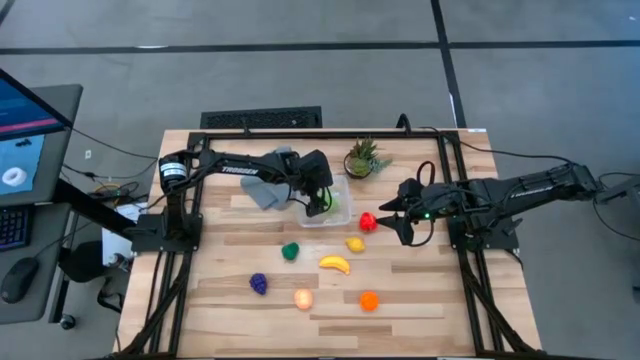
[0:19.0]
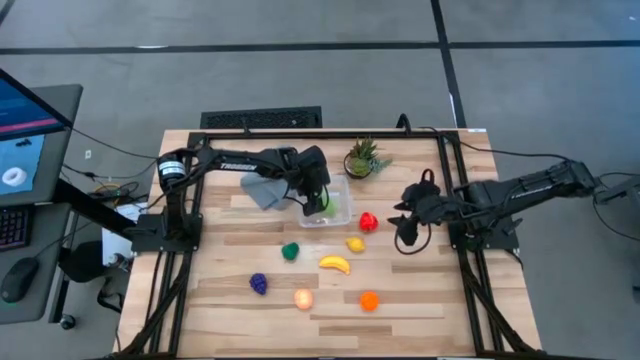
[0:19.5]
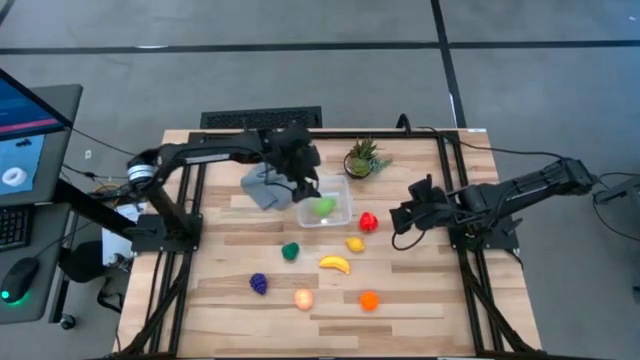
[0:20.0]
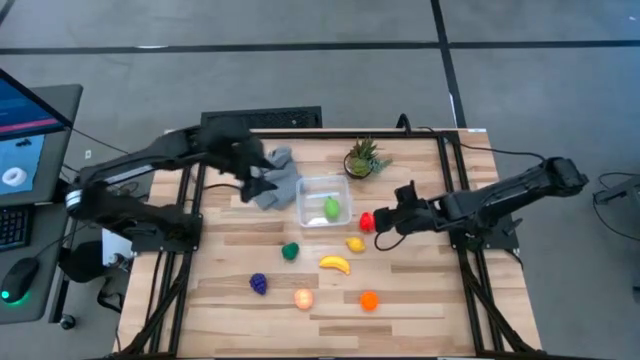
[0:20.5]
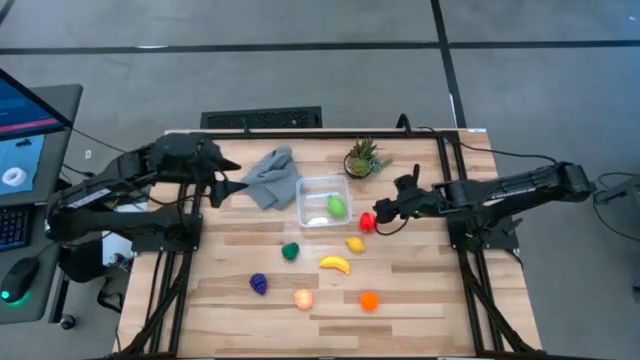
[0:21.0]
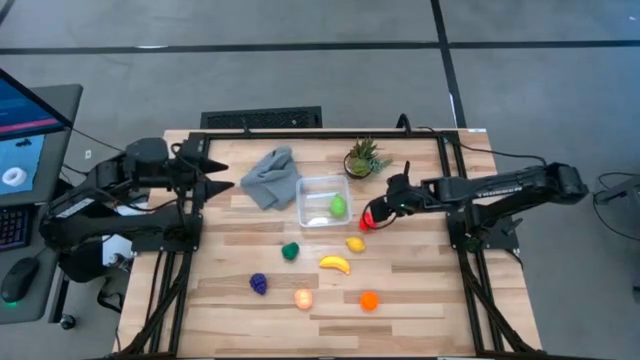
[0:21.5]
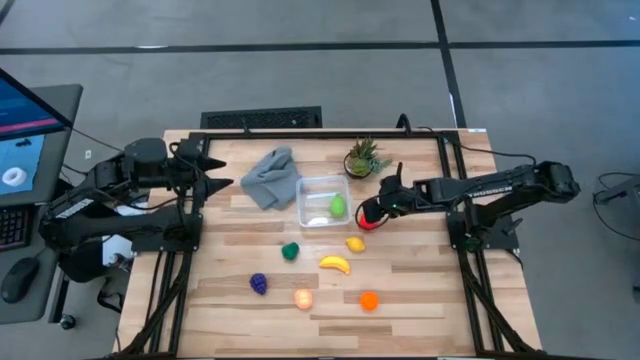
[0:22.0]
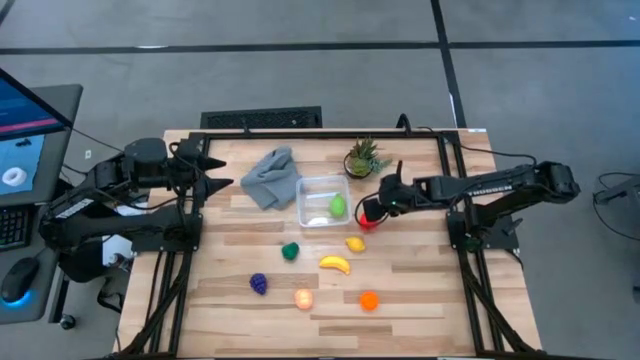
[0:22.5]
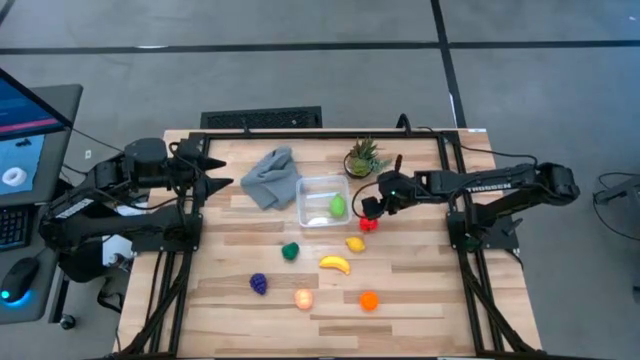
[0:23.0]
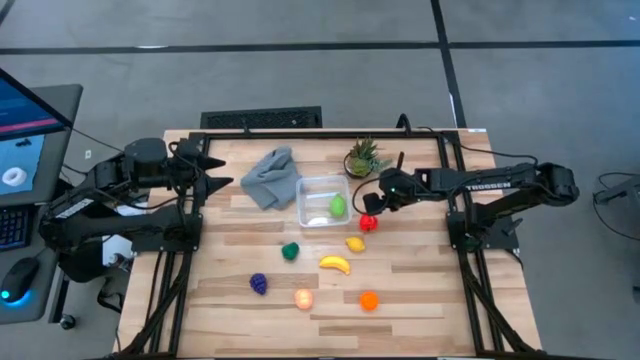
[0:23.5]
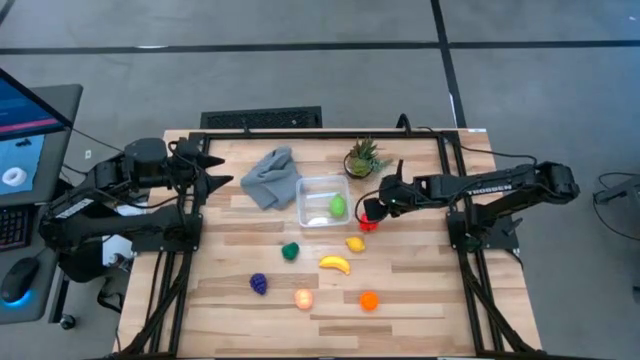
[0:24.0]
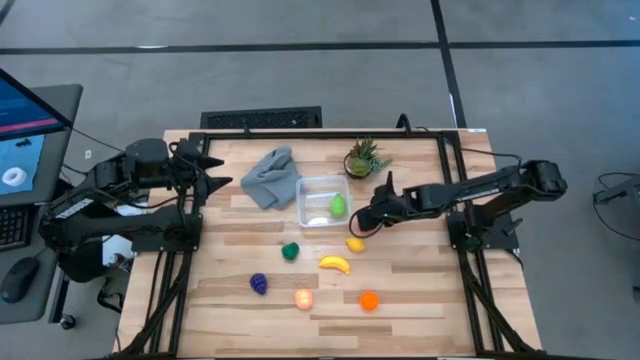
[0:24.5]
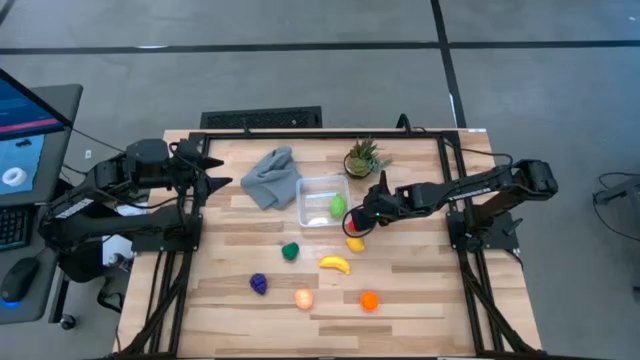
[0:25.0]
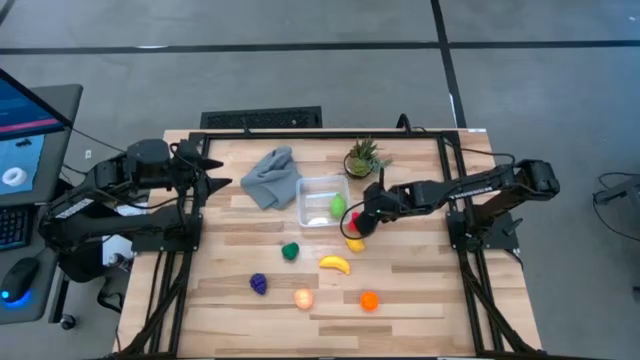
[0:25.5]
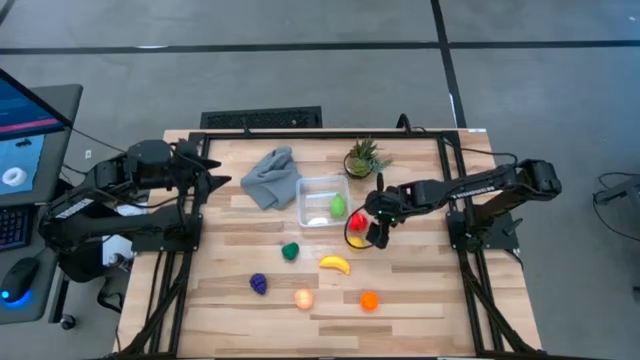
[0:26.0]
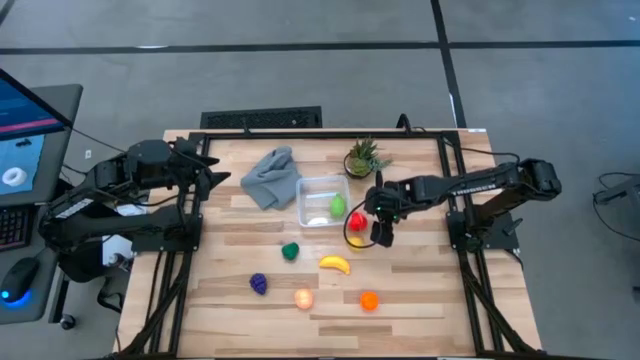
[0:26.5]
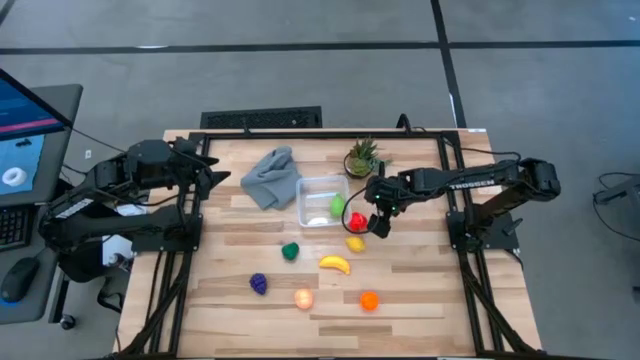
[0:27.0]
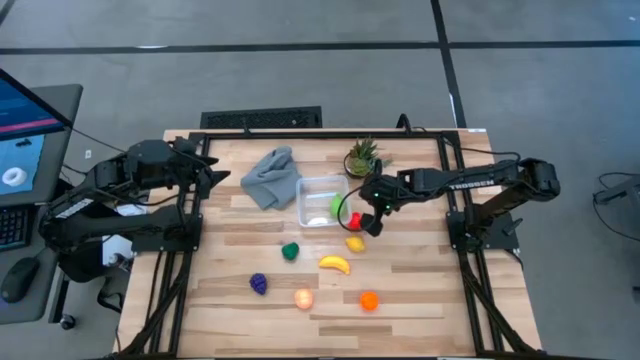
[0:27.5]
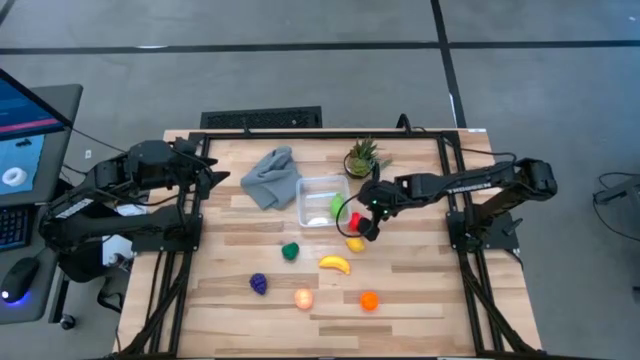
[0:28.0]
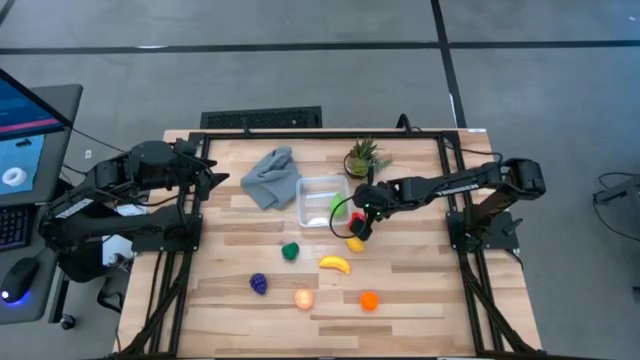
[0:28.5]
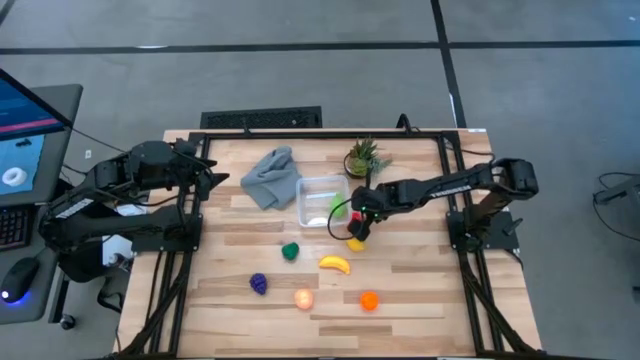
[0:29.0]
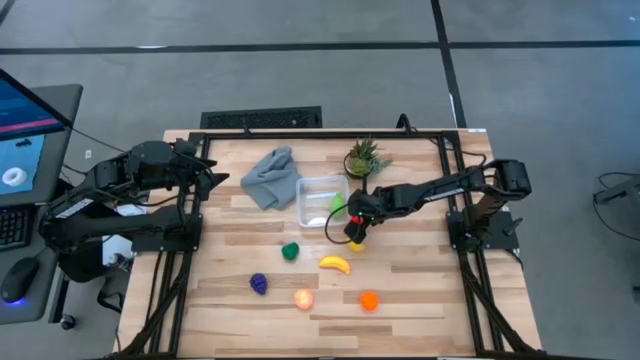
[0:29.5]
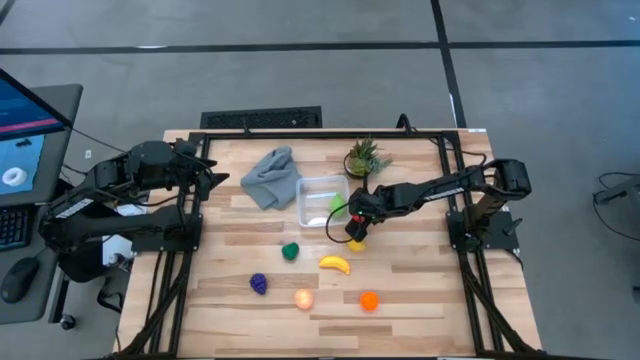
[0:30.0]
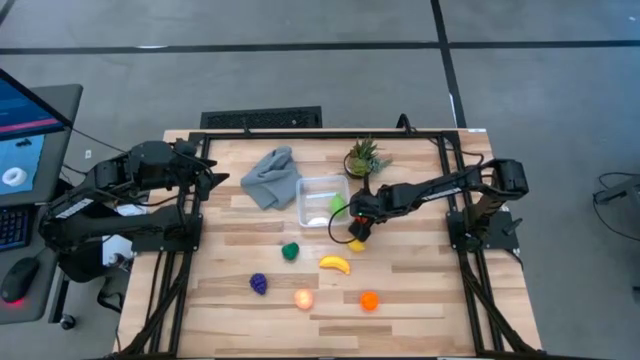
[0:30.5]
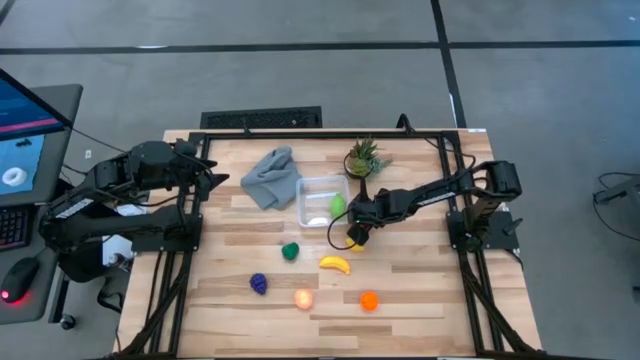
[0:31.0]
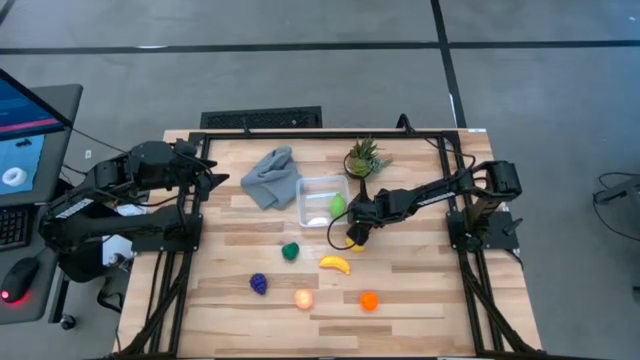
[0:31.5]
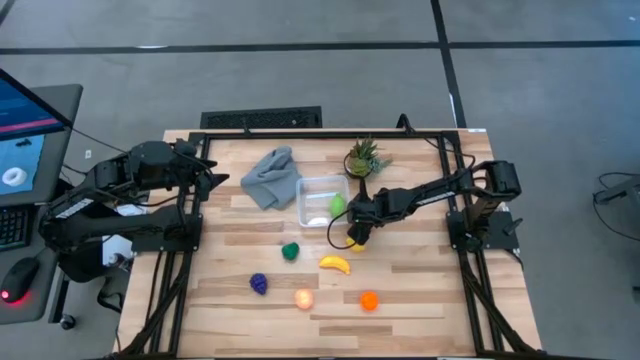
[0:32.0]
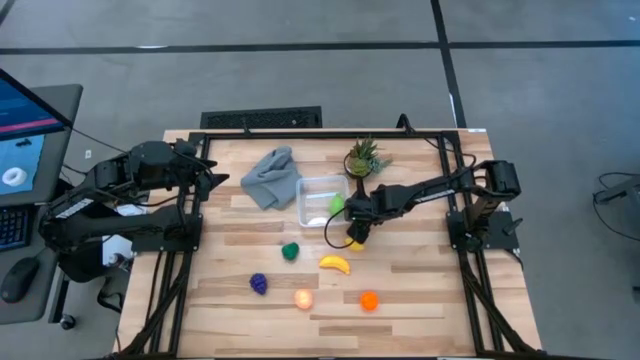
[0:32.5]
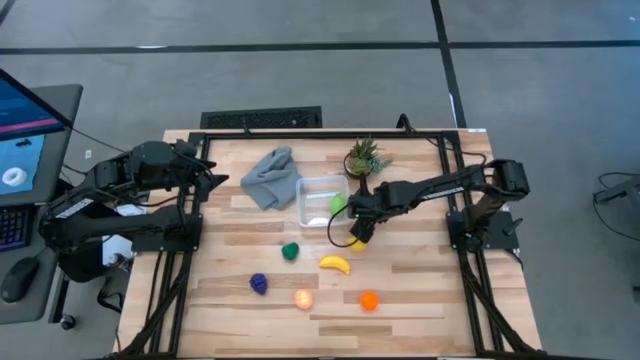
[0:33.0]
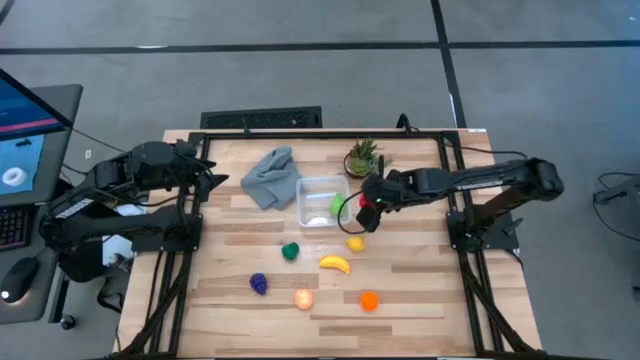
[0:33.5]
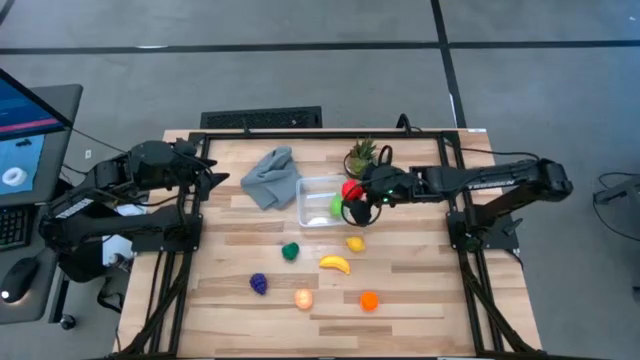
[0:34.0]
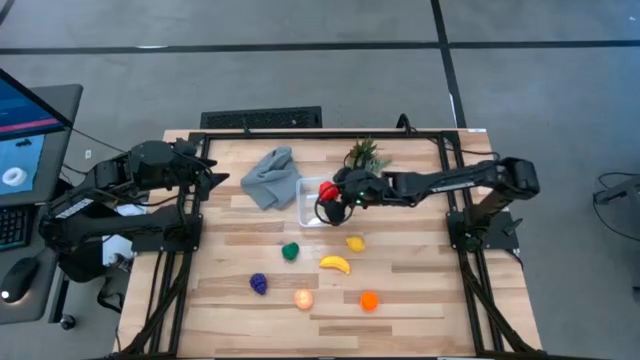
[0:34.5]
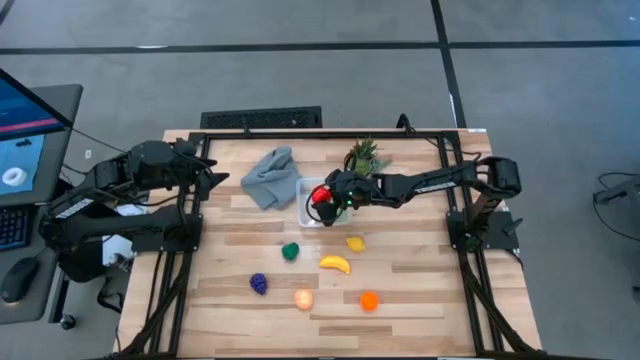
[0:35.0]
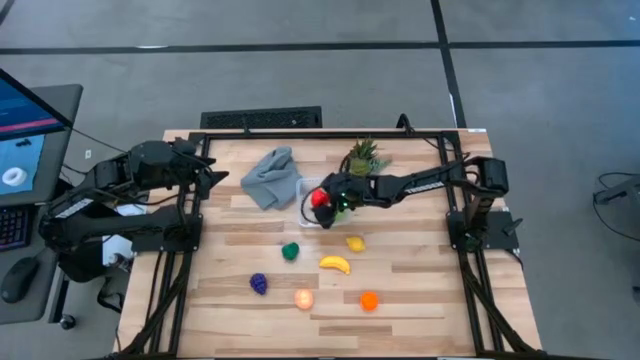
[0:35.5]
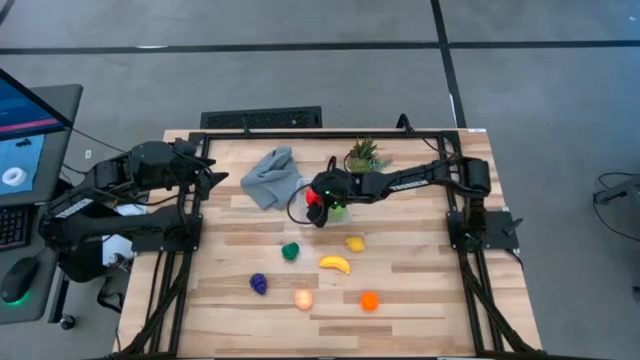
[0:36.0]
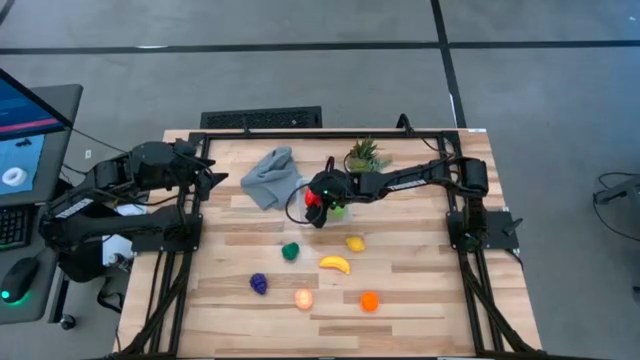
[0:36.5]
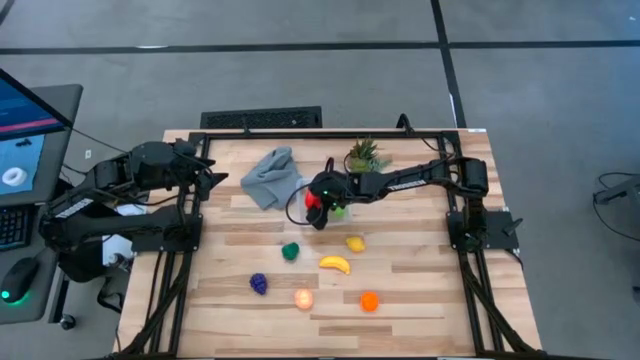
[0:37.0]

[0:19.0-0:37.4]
Task: Pick and placing Produce into tupperware
Put the red apple into the transparent bin
